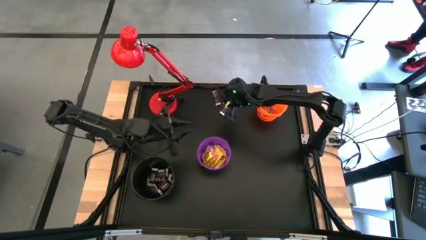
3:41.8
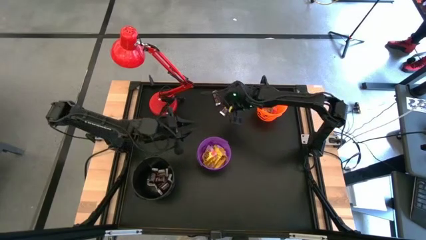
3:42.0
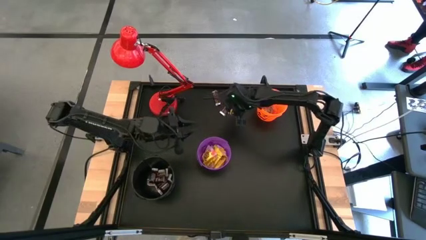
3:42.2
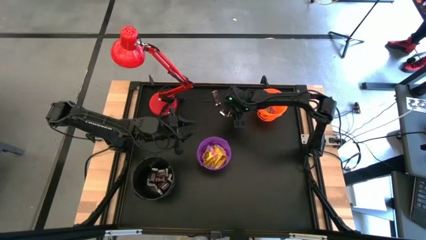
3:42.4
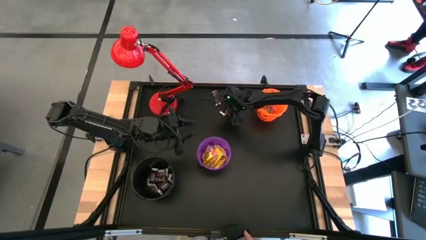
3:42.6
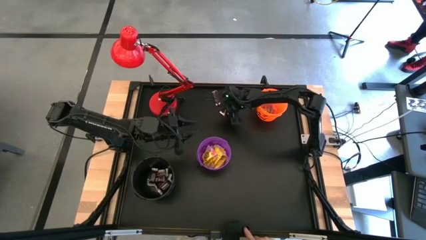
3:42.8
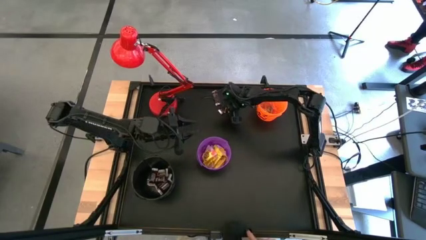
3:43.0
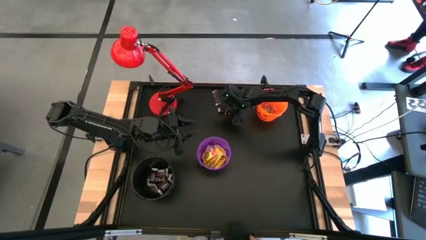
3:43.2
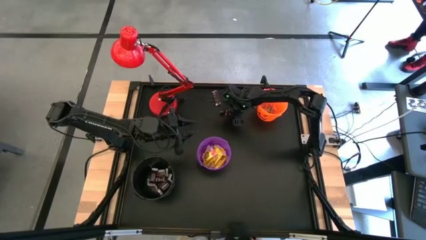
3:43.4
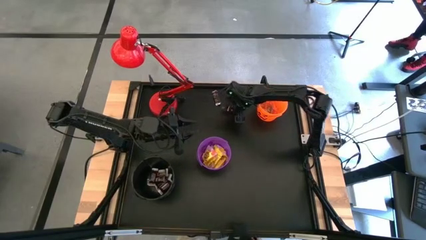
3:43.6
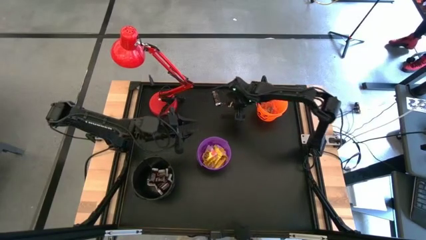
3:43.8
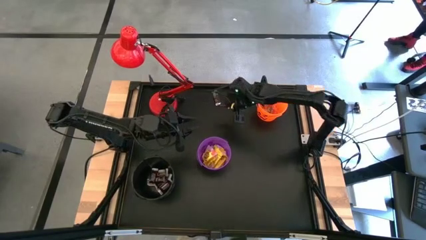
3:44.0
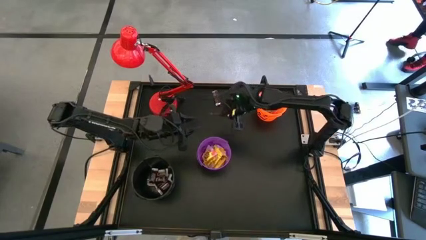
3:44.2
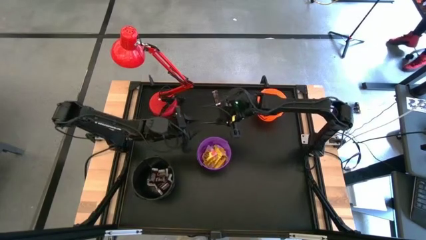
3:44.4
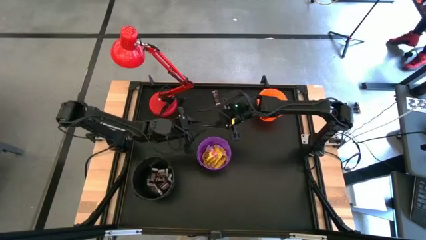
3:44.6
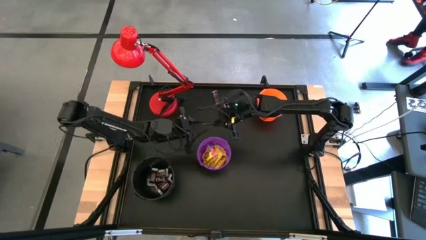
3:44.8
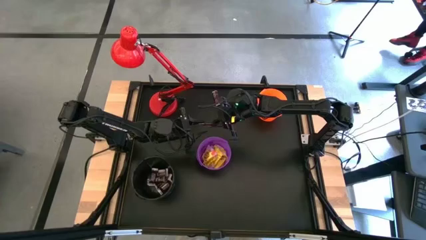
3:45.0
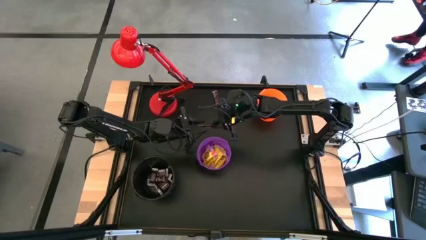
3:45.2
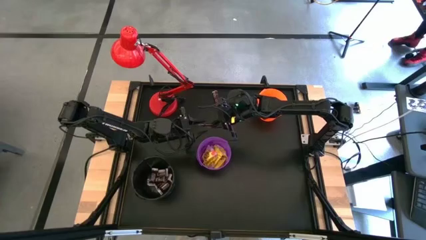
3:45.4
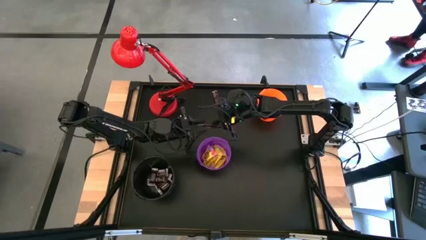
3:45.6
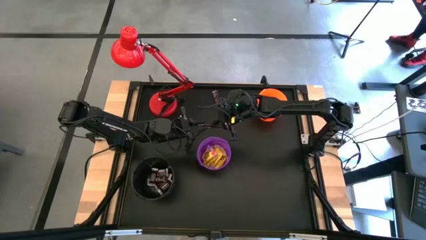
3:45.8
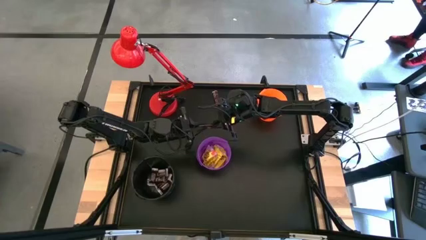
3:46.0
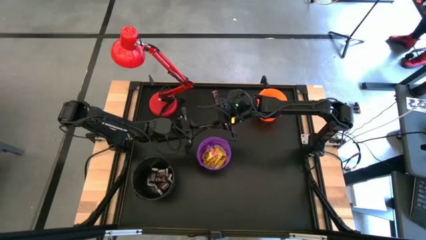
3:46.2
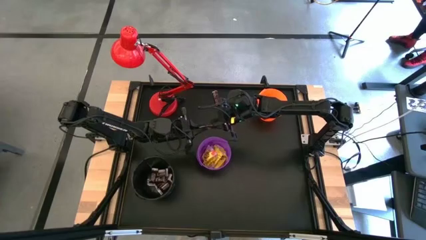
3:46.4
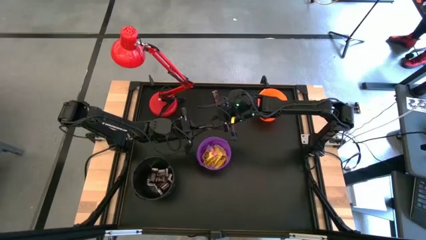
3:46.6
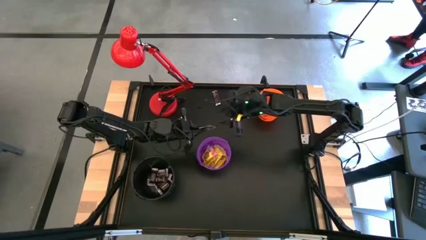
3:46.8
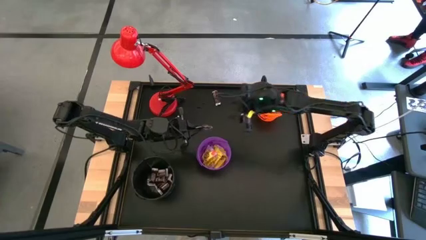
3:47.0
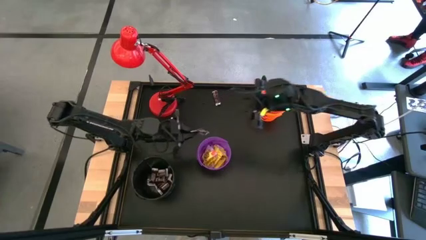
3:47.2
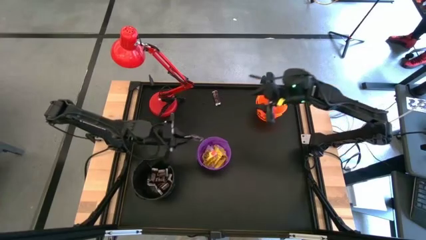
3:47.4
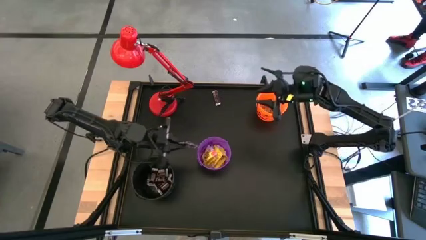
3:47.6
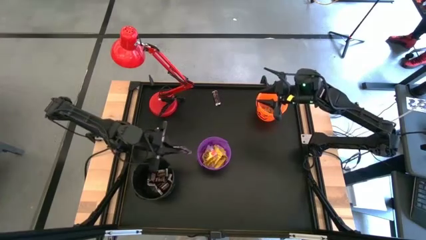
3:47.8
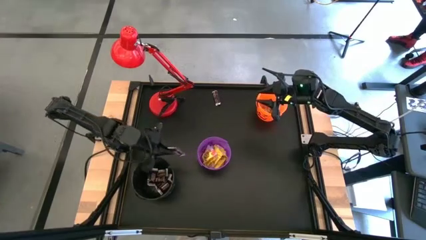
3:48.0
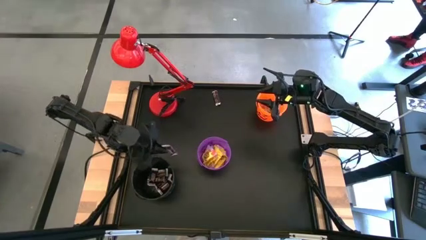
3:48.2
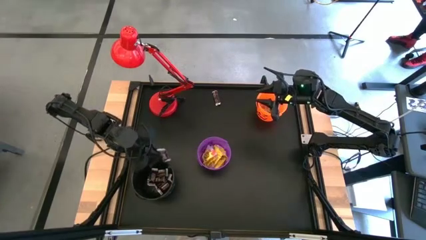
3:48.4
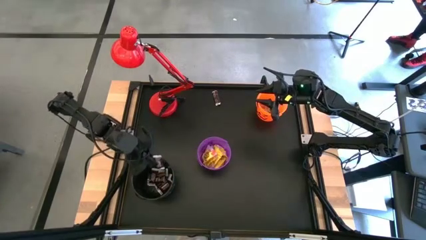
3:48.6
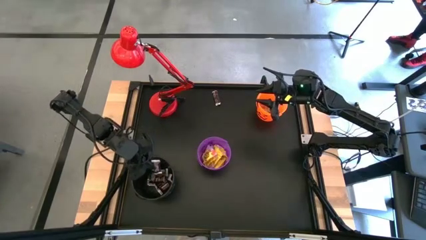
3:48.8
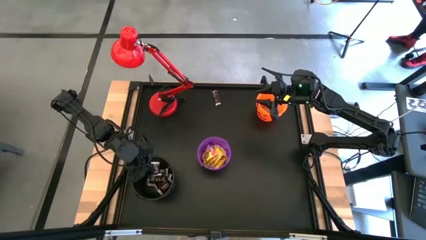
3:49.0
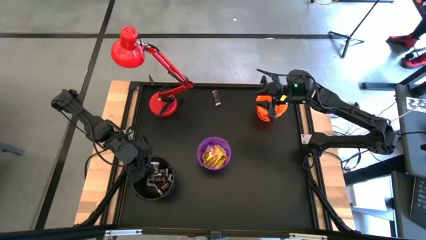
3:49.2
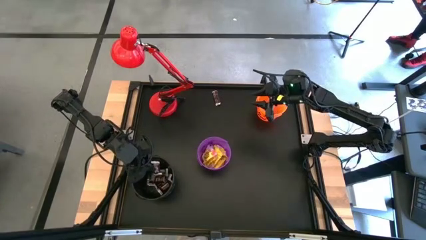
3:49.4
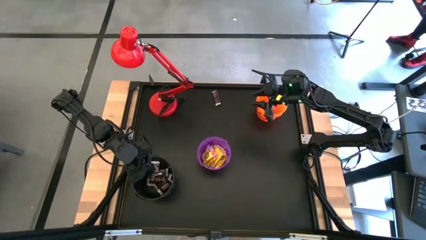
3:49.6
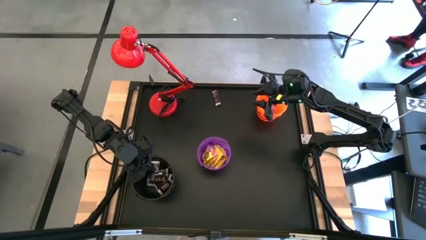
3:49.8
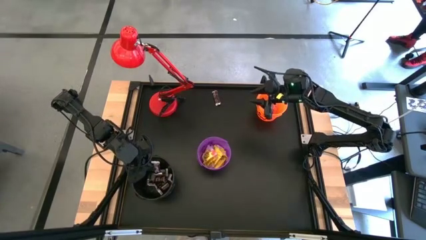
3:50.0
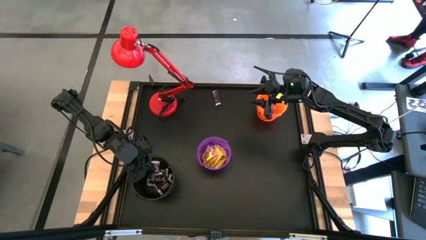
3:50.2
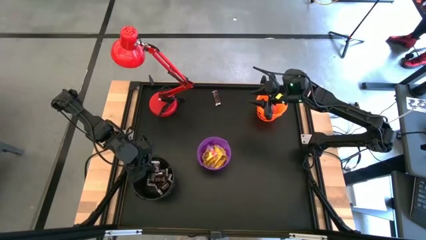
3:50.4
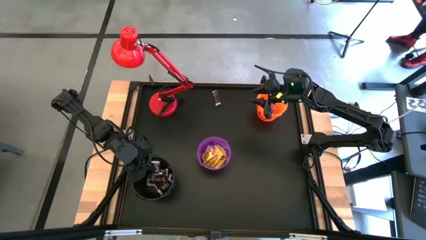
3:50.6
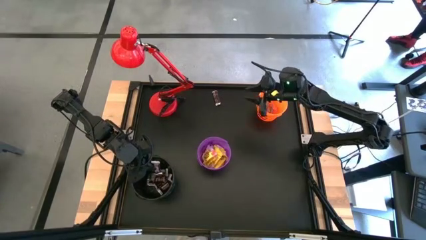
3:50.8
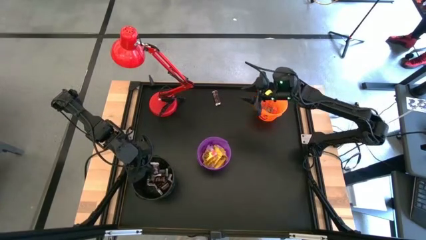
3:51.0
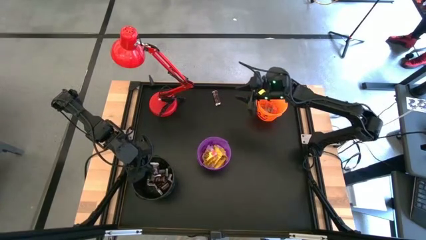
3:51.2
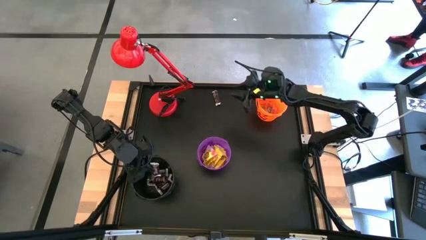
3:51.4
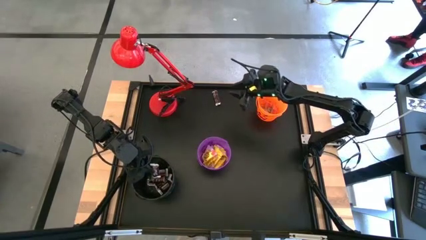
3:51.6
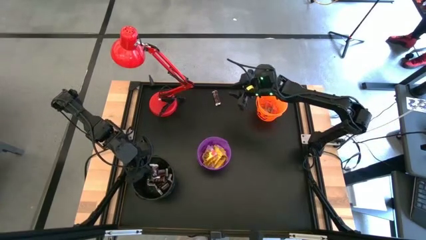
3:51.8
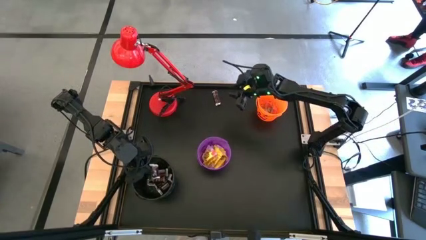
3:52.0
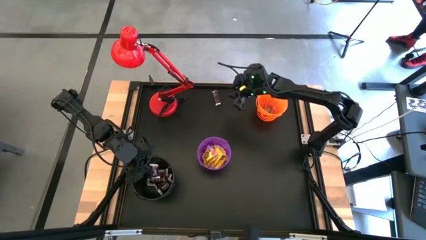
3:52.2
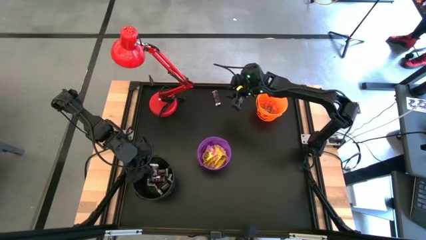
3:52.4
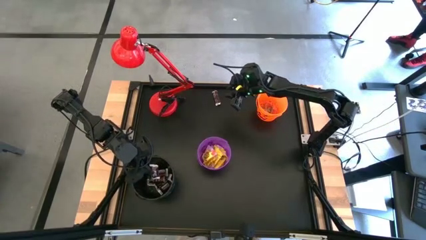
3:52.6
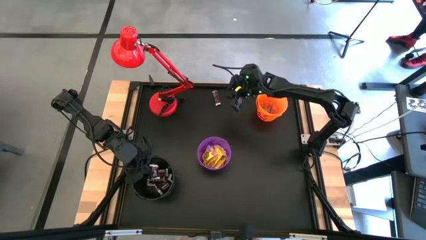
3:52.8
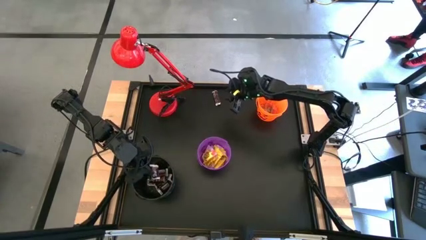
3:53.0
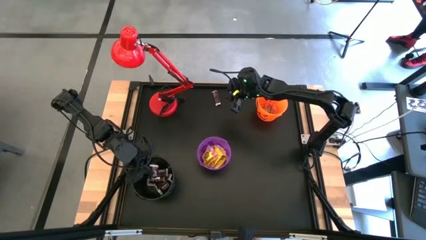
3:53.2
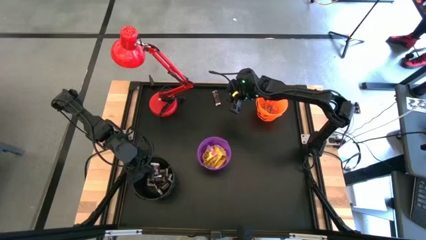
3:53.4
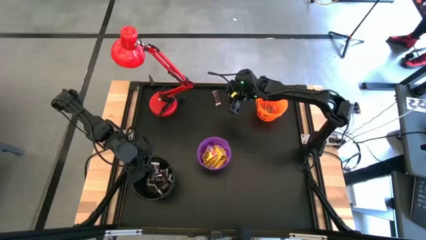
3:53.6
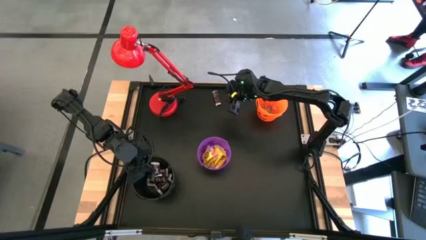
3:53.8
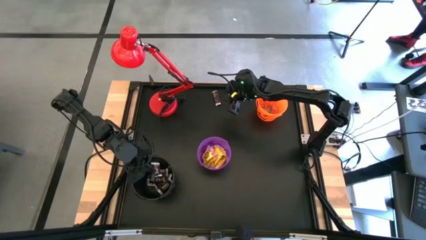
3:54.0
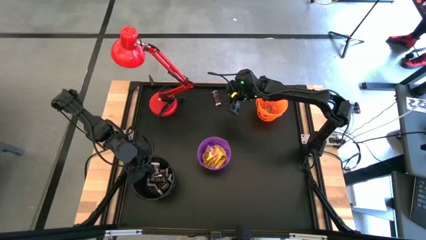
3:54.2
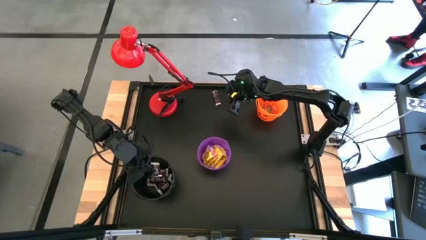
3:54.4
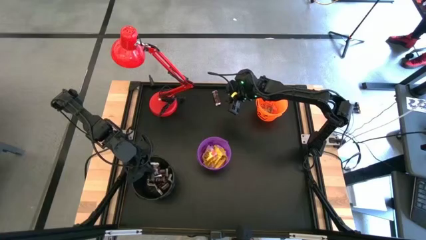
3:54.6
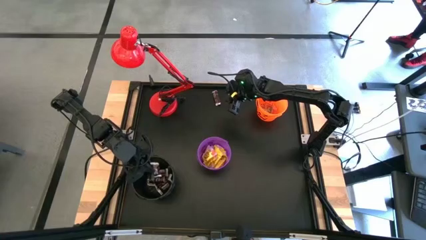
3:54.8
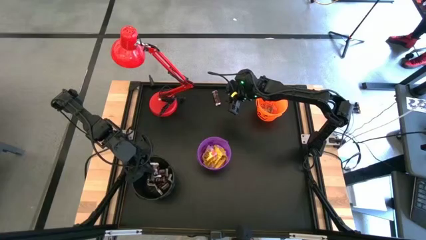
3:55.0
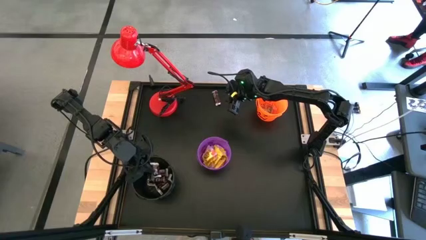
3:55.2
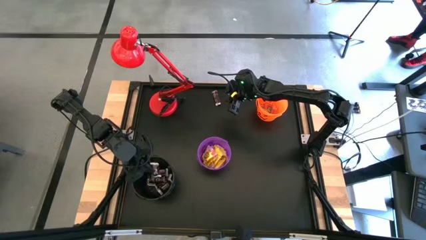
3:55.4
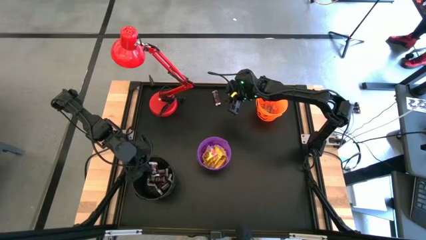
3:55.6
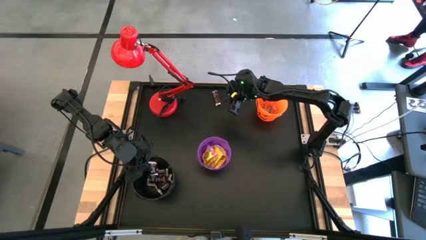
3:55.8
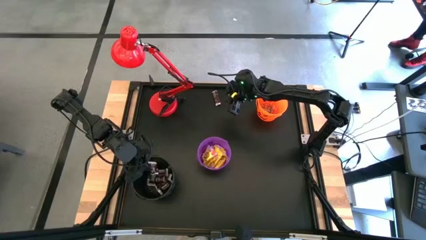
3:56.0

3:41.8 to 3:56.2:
Task: Sort candy
Put the brown chocolate bar into the black bucket
